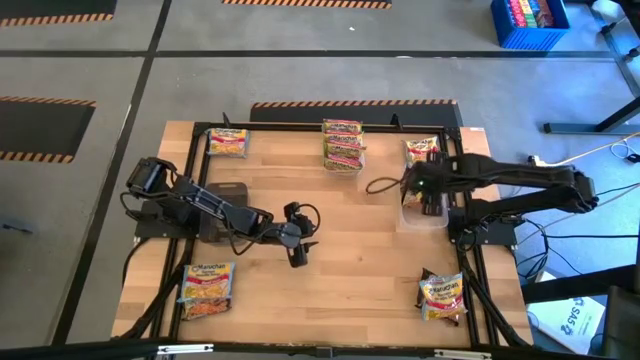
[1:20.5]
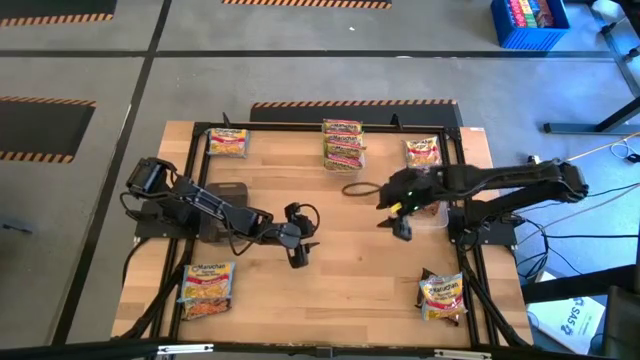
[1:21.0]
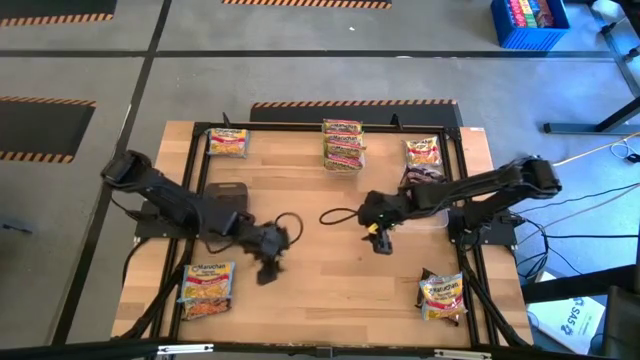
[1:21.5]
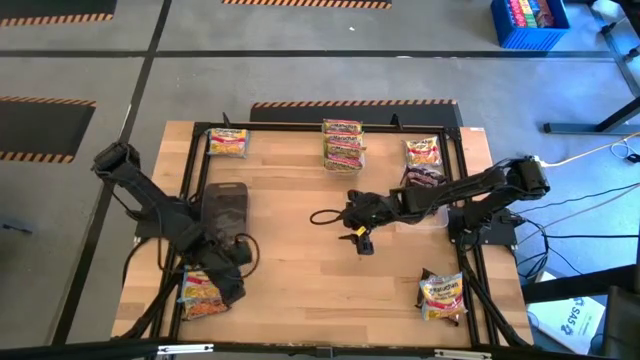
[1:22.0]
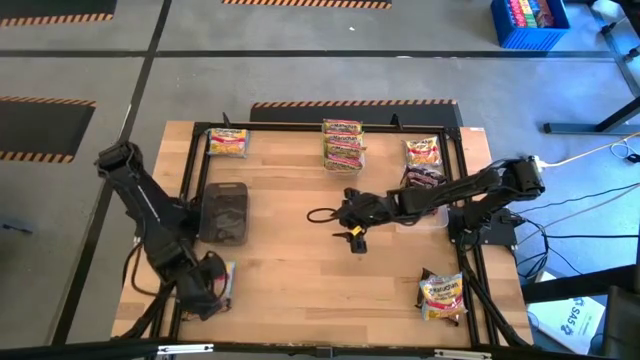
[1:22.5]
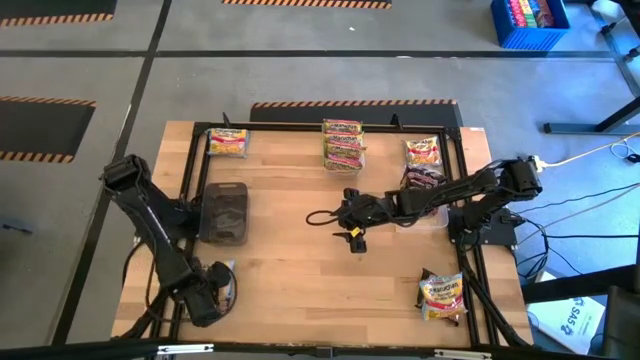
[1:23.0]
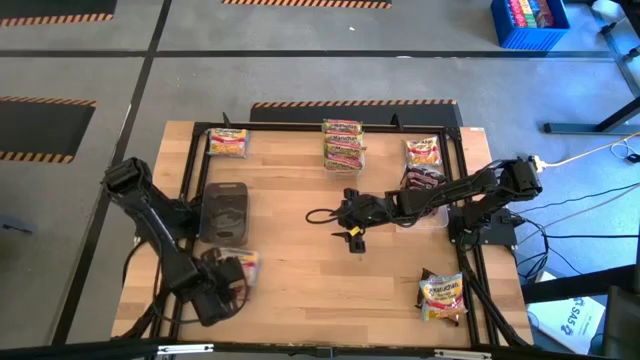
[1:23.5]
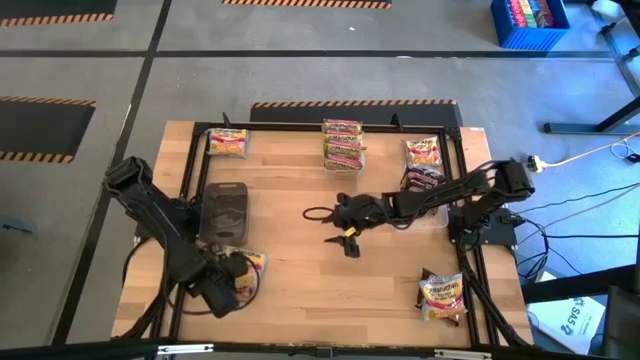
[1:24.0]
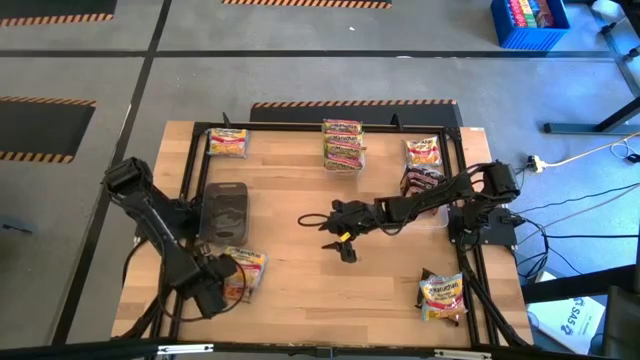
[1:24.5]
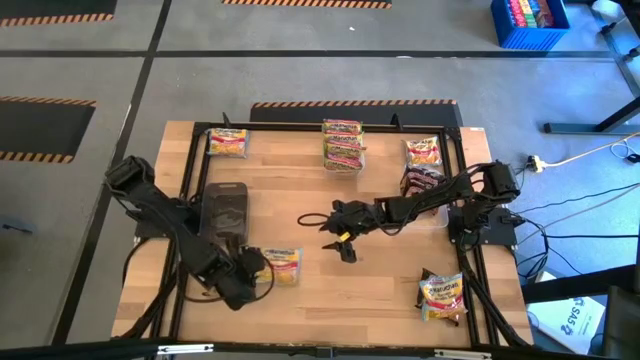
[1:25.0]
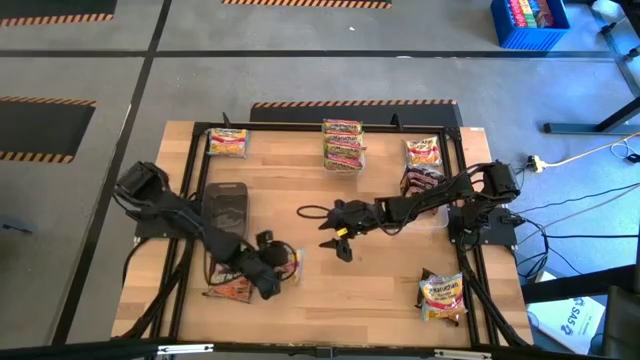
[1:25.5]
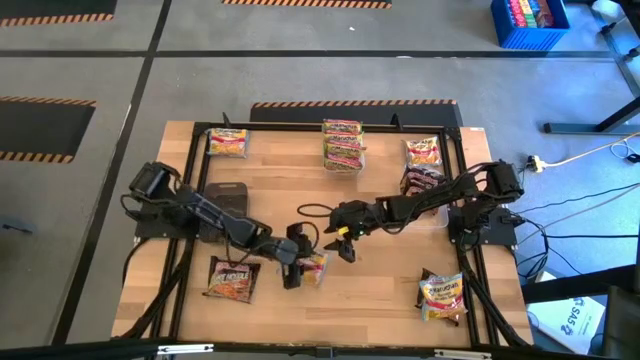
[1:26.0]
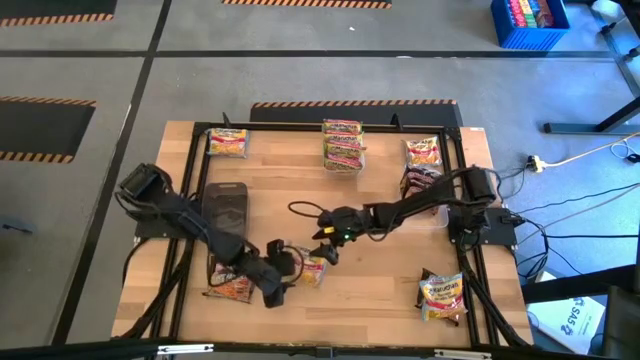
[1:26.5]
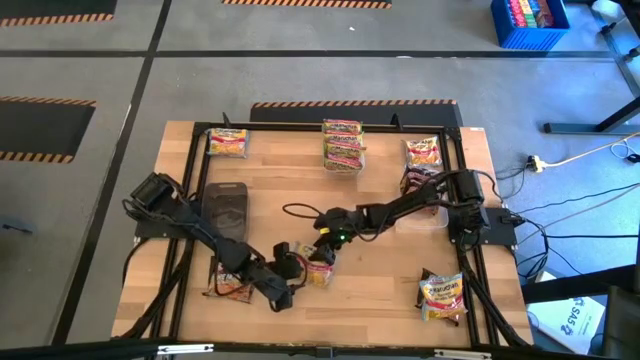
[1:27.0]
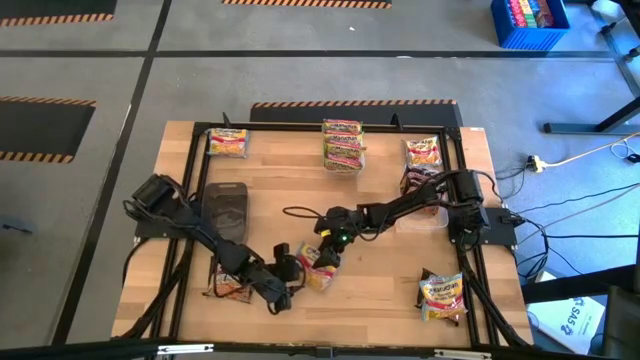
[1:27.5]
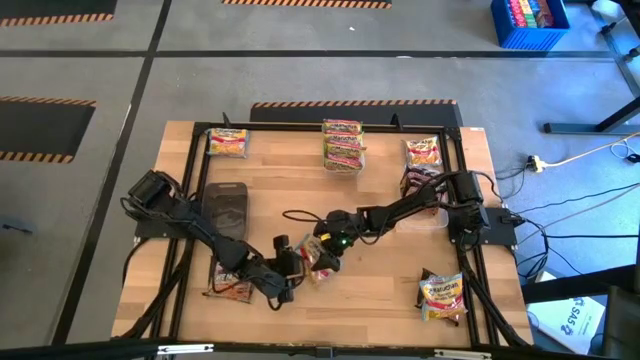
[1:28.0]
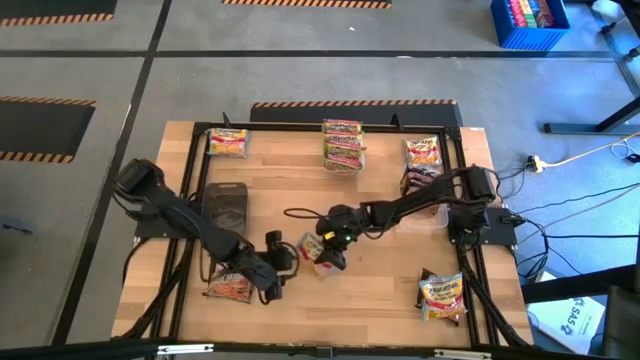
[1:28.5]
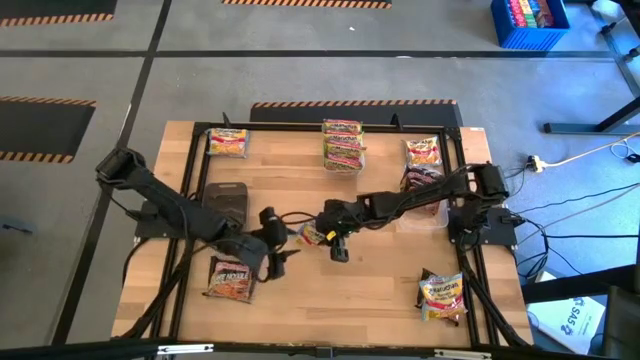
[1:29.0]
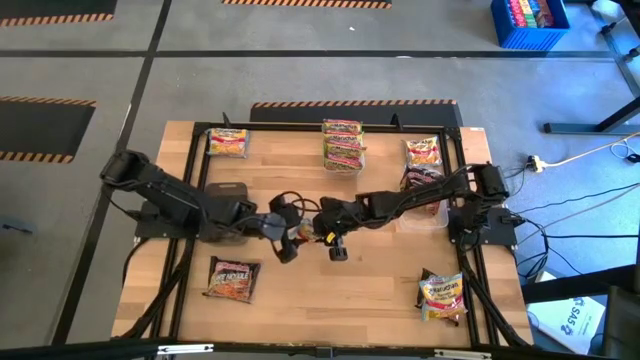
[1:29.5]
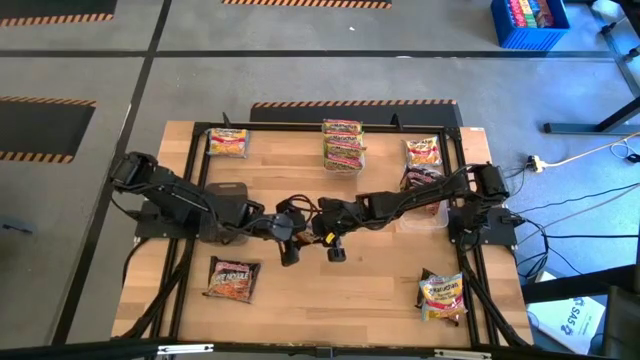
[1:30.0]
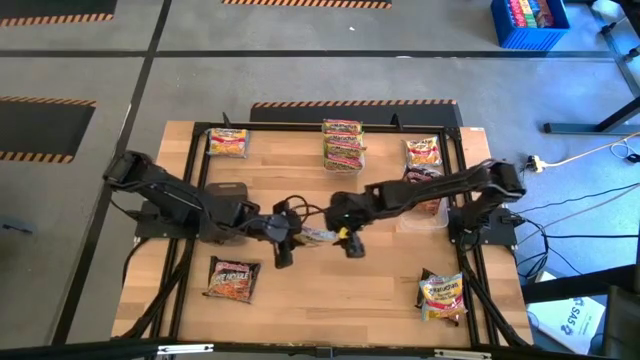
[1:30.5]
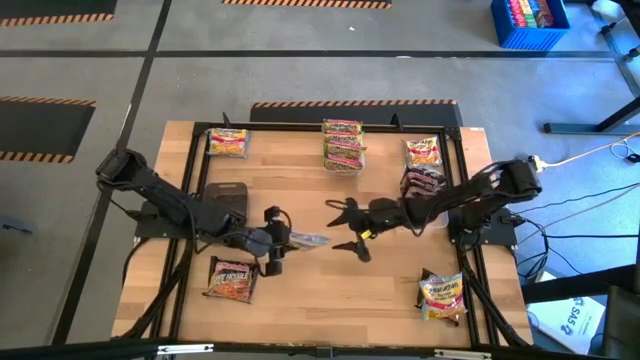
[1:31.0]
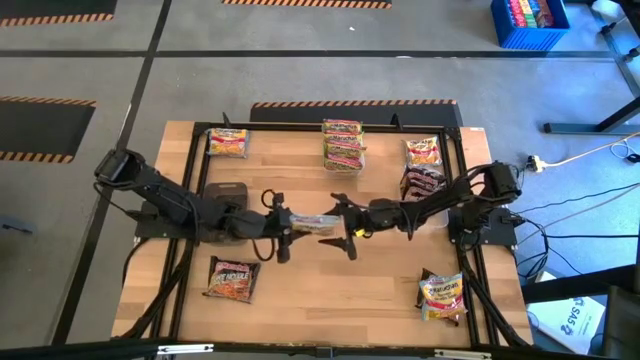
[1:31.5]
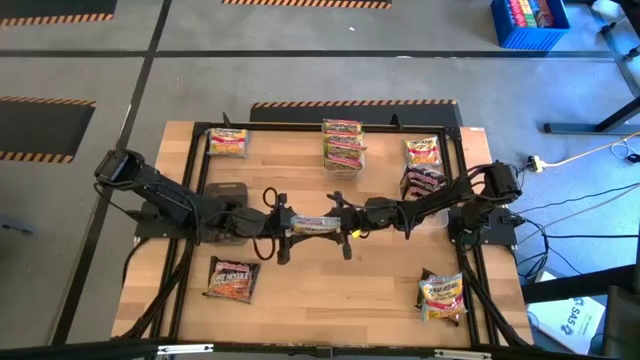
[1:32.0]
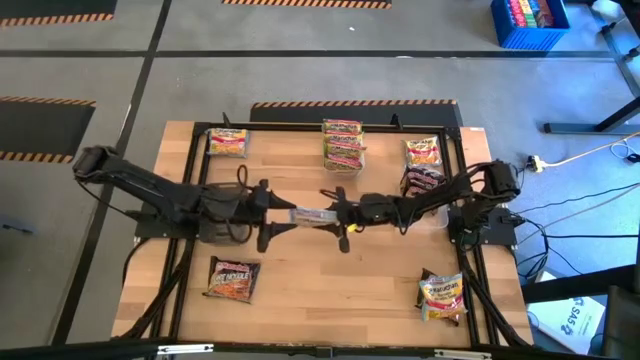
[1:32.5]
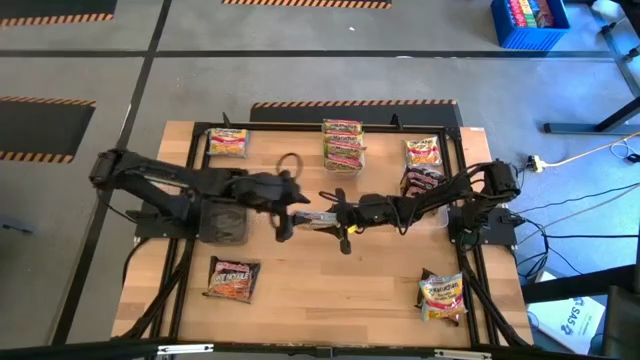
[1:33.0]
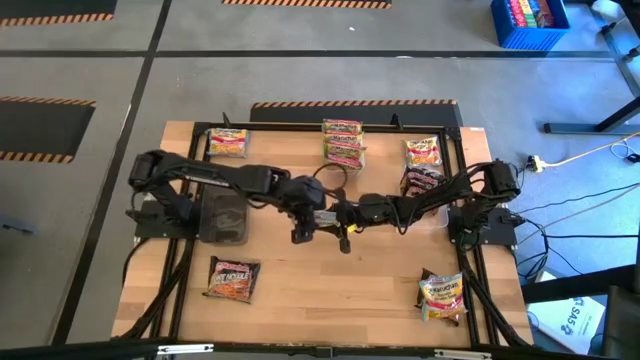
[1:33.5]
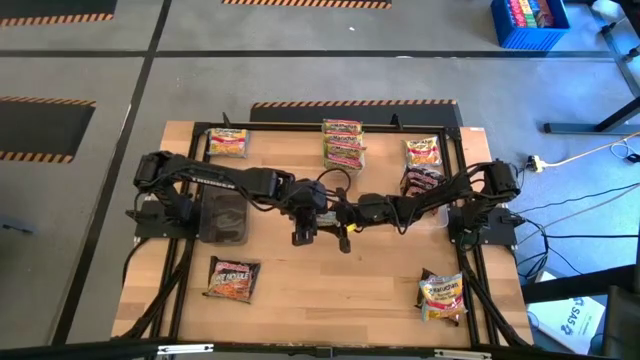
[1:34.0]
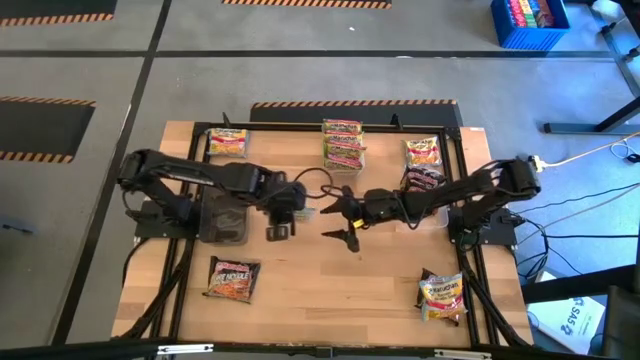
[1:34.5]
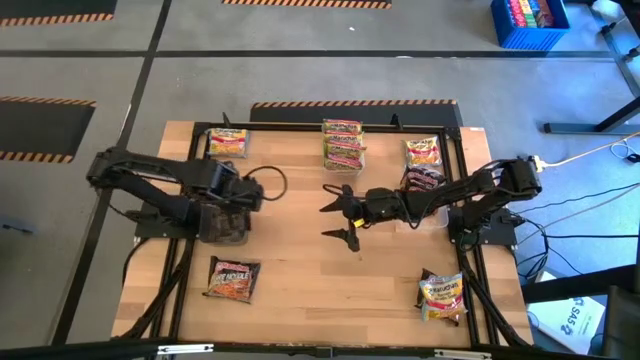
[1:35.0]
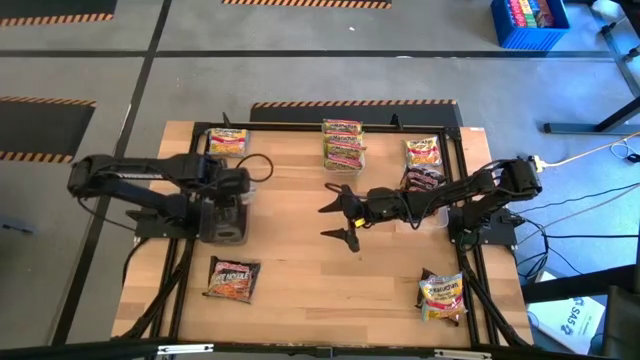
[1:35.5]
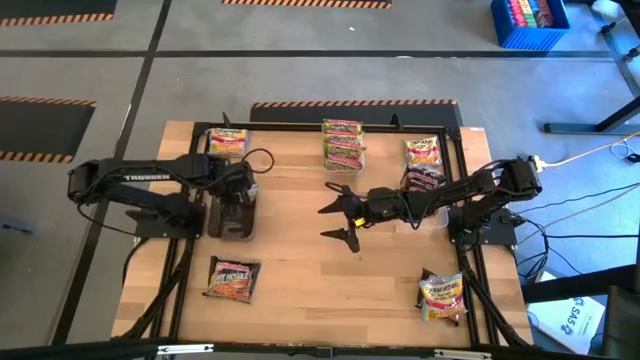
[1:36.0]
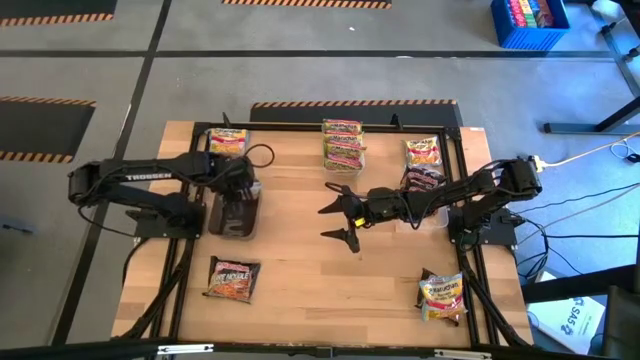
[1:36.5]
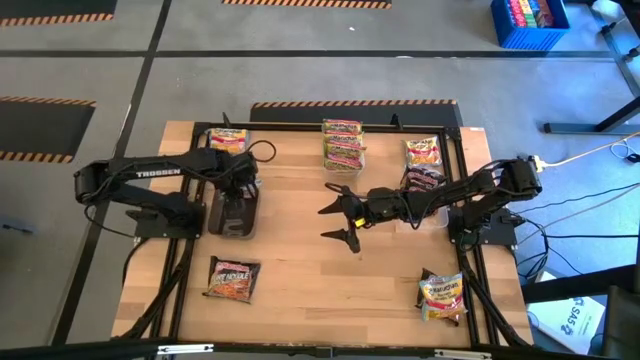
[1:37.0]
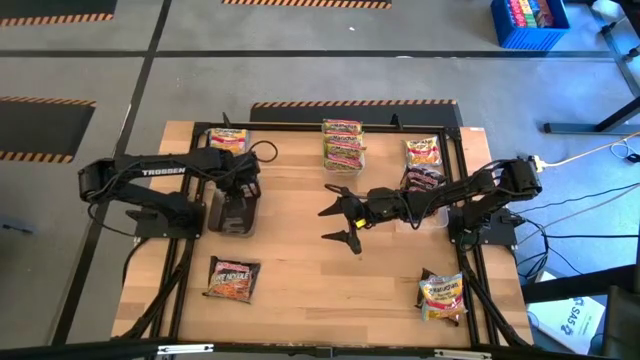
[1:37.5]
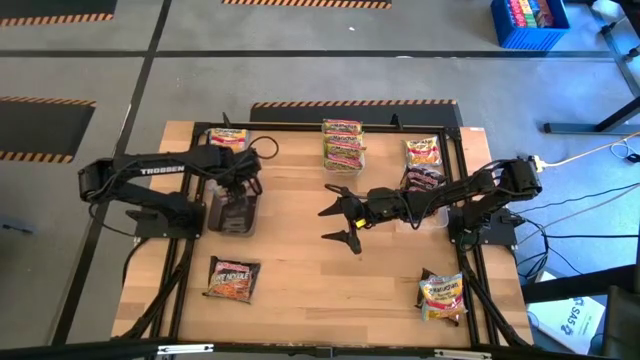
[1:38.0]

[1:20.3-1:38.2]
Task: Sort Maruchan noodles
Put the bottom left blue noodle pack into the black bin

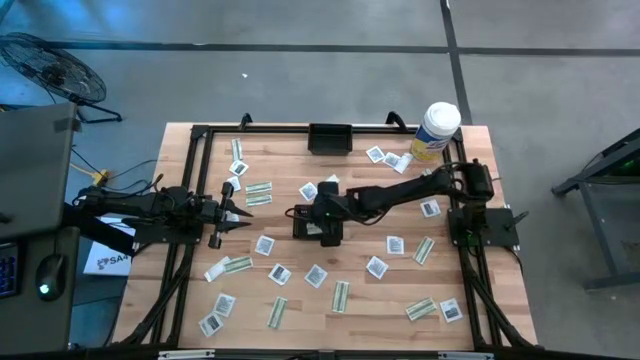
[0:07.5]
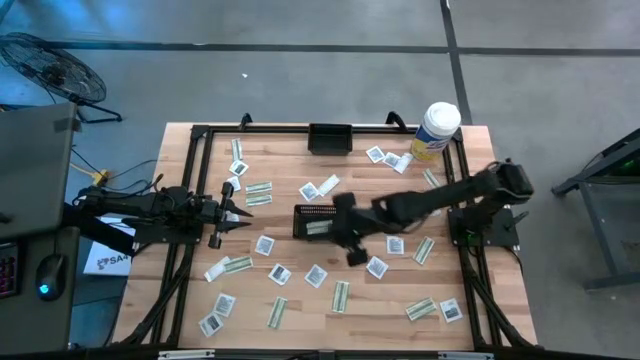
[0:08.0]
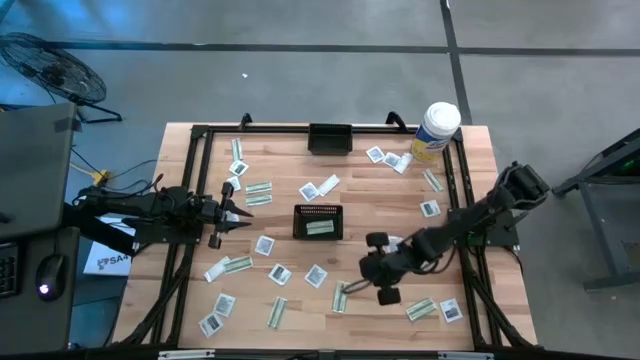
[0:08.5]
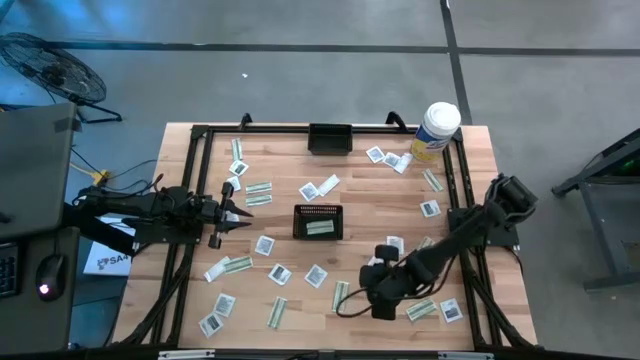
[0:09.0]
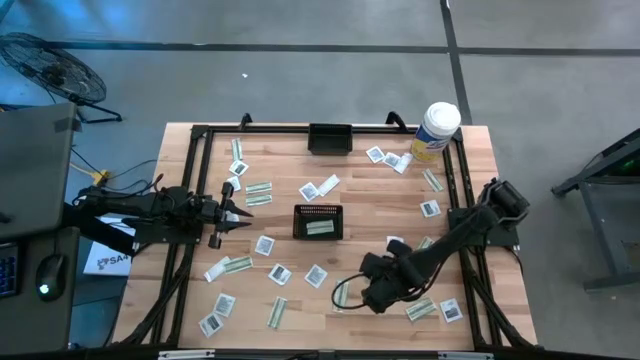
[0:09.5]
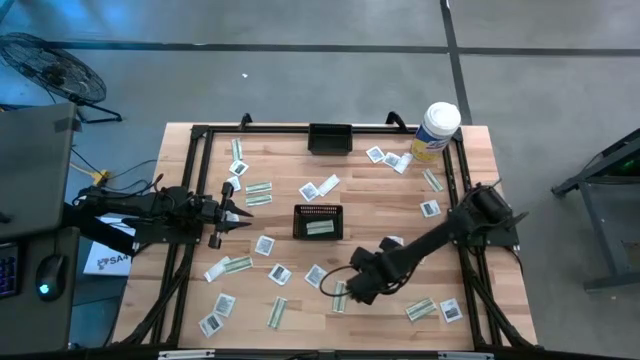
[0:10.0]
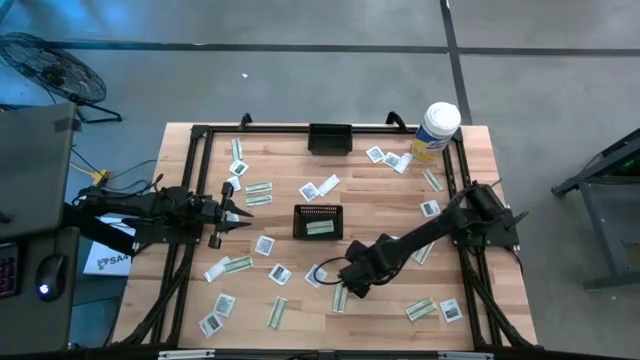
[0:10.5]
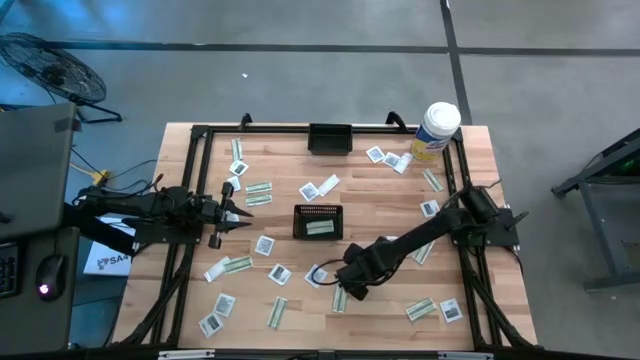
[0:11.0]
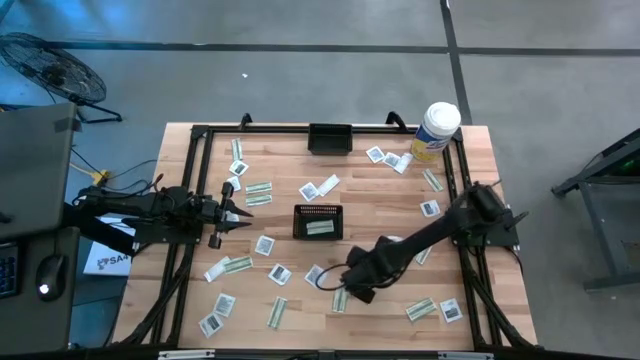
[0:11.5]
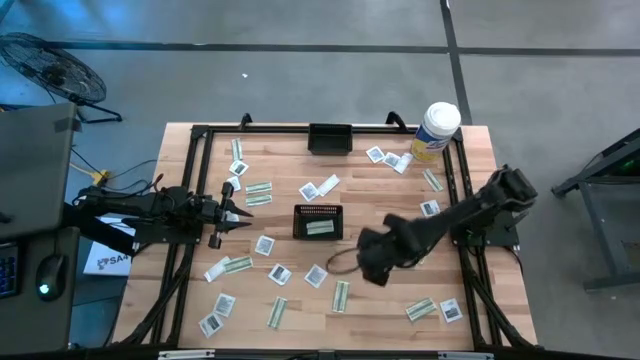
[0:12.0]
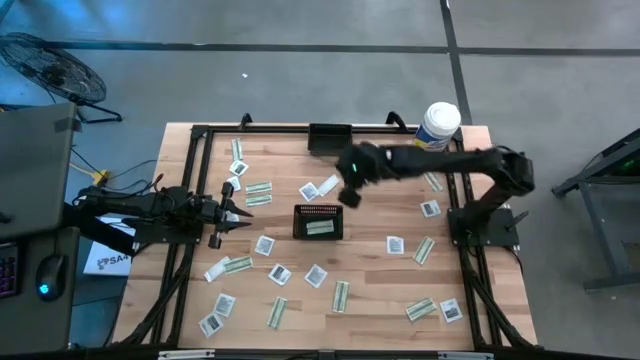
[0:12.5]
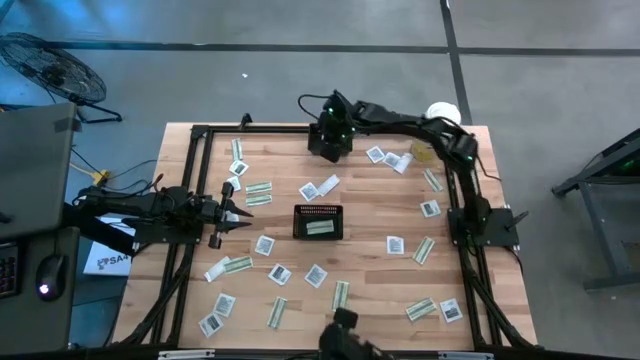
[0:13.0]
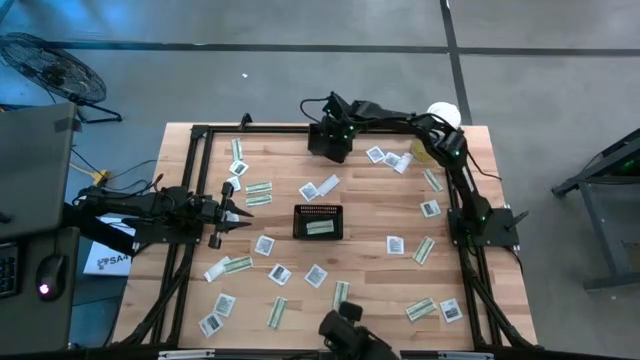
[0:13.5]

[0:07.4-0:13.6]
Task: Pick & Place First Aid Supplies
Put the towelette pack into the top black basket
